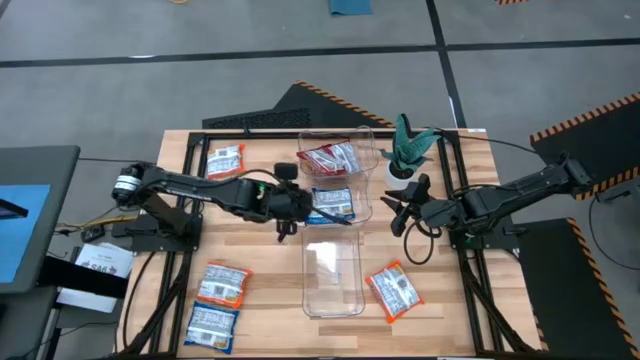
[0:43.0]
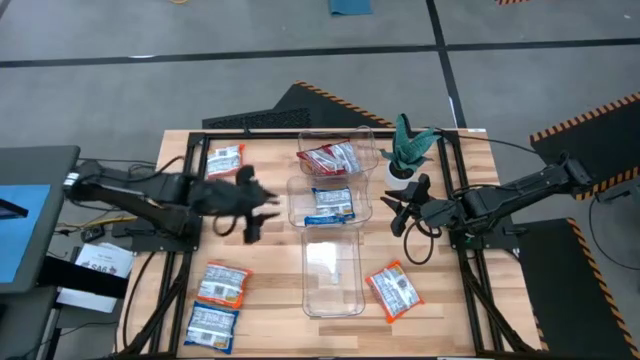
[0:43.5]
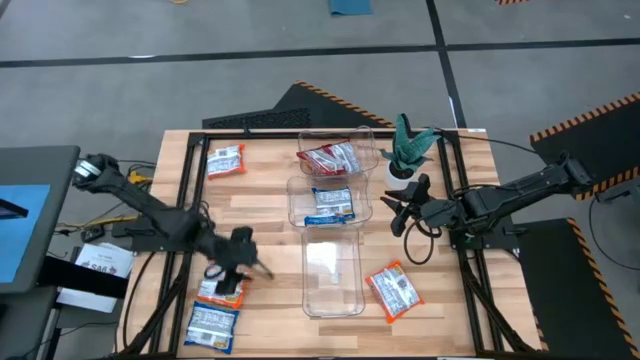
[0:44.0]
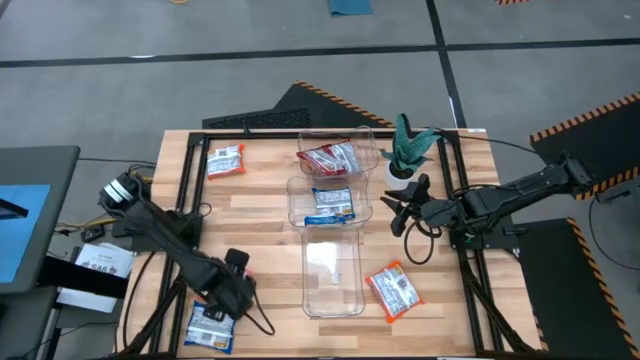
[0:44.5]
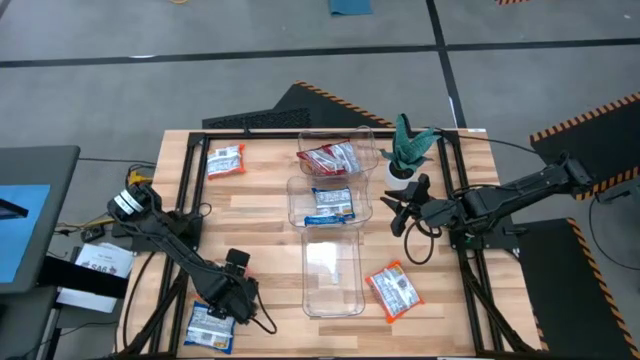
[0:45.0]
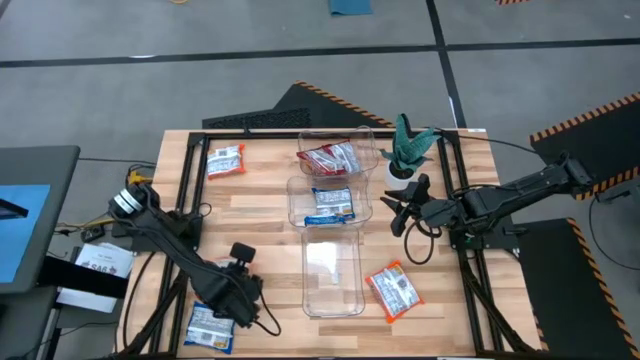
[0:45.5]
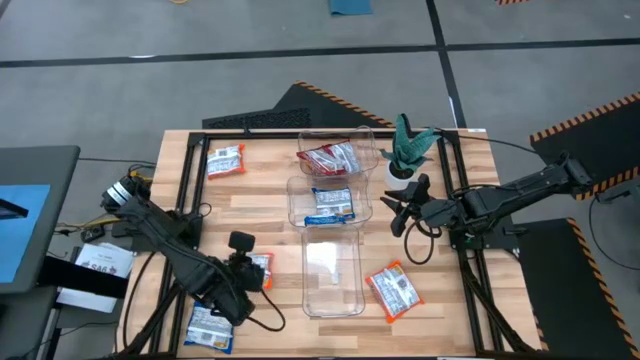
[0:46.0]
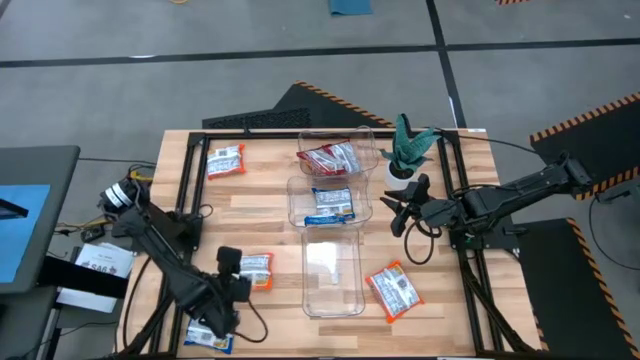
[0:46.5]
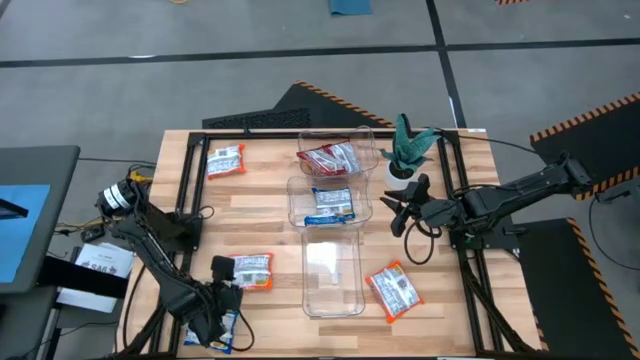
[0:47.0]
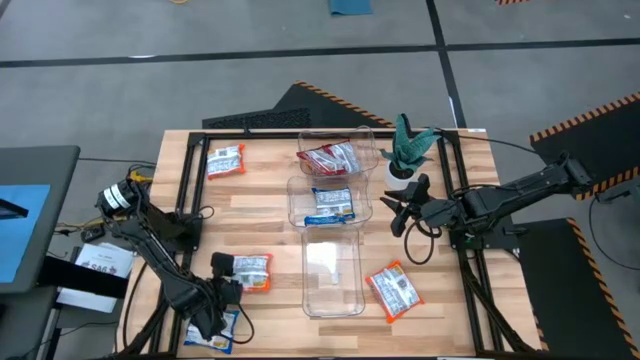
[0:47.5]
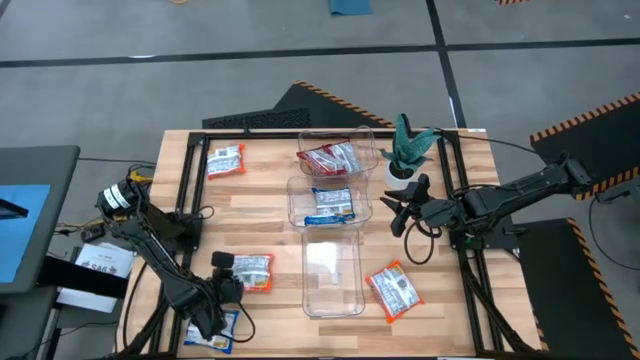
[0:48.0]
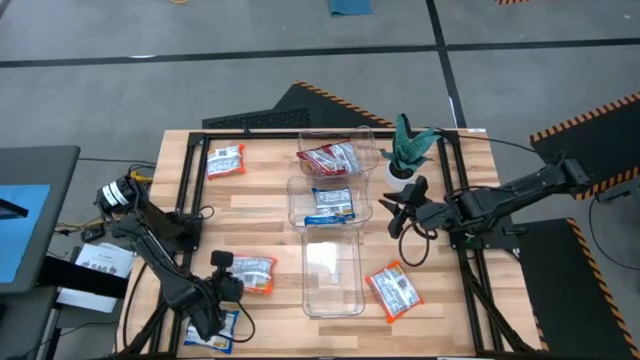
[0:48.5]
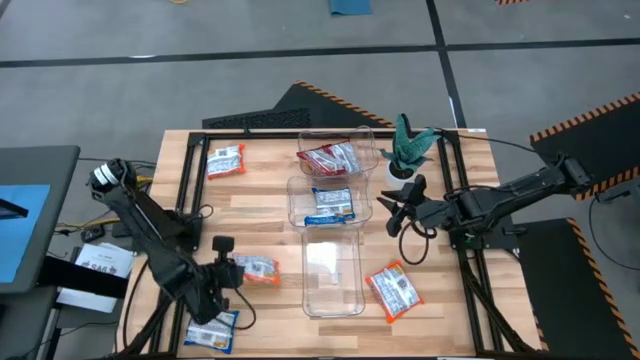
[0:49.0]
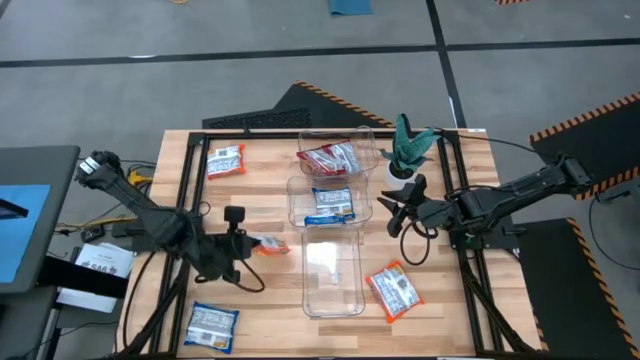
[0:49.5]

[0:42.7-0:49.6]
Task: Sort Maruchan noodles
Put the bottom left orange noodle pack into the bottom transparent bin

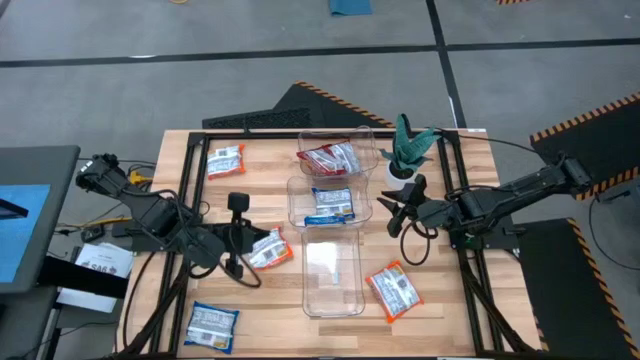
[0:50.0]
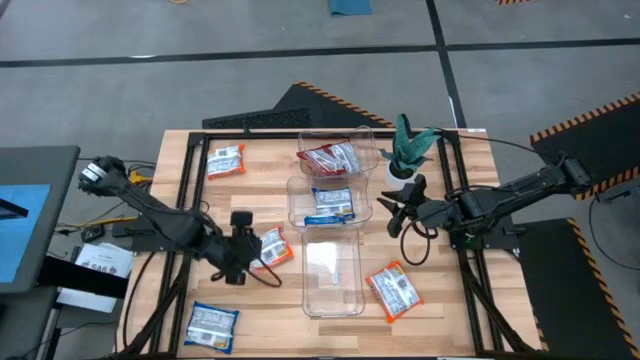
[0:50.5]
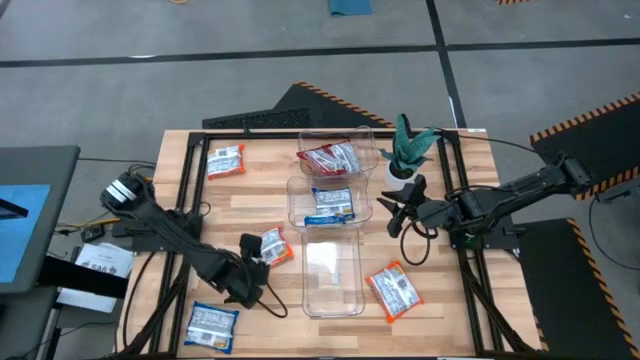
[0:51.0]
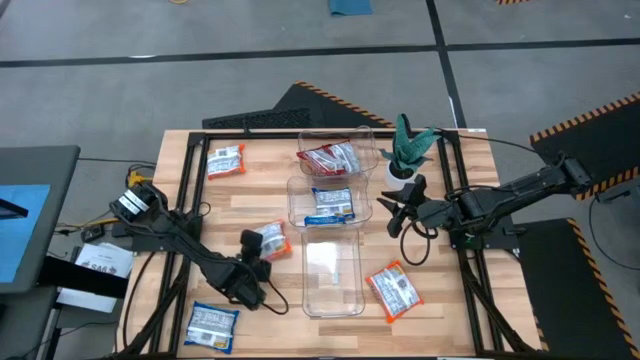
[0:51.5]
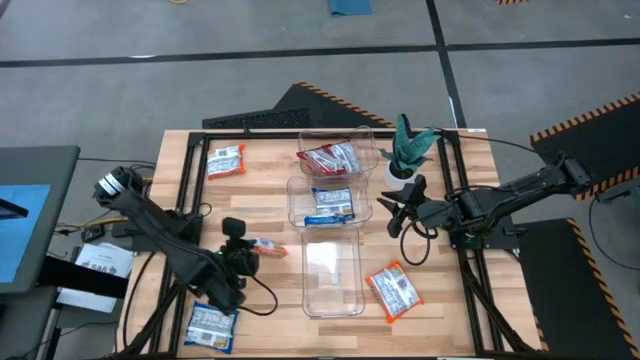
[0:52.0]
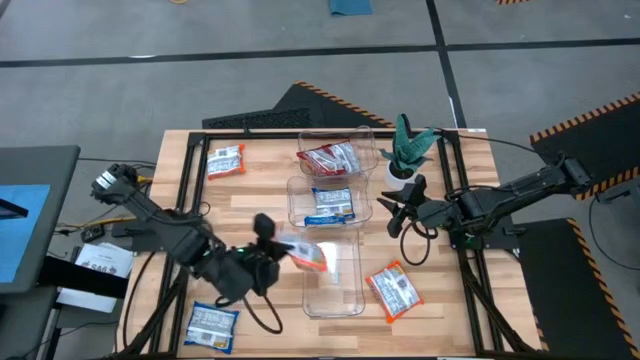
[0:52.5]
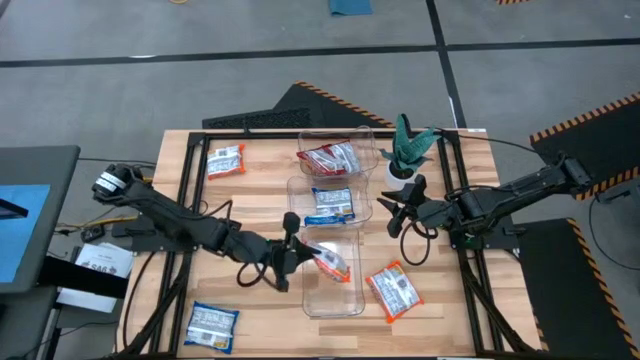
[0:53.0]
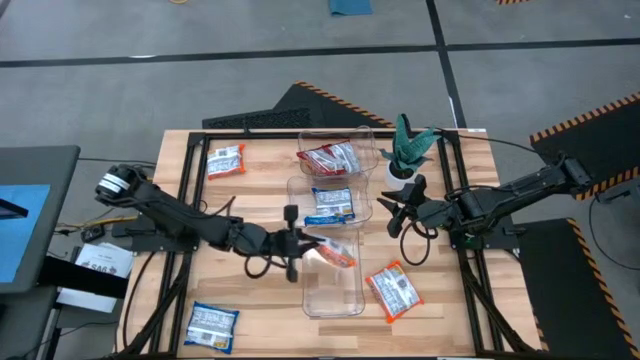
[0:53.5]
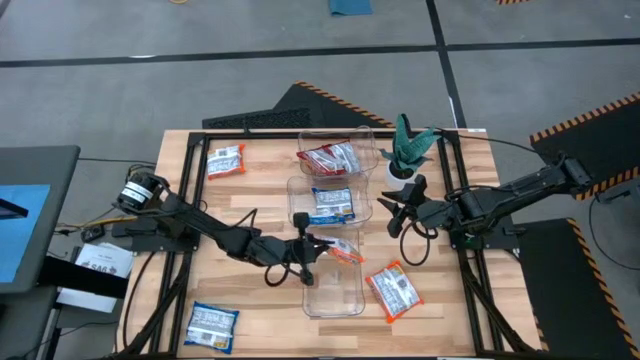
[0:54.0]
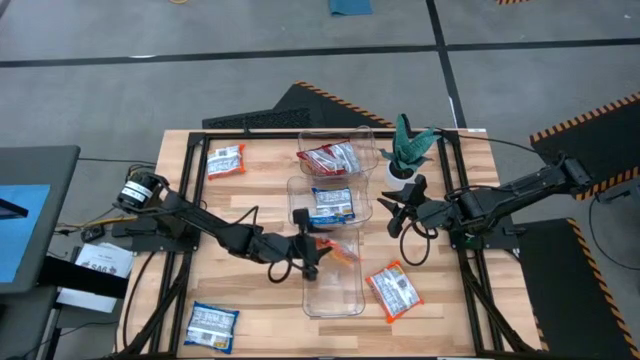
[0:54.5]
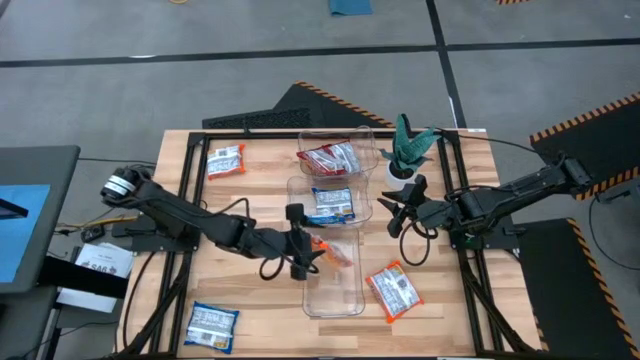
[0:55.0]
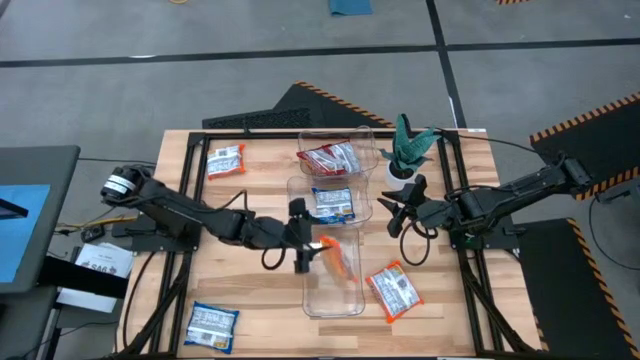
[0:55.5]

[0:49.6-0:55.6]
Put the bottom left orange noodle pack into the bottom transparent bin

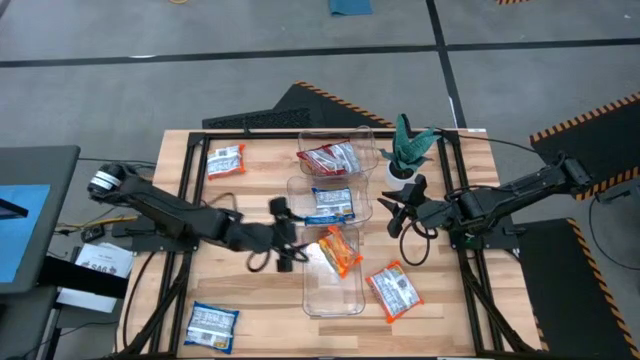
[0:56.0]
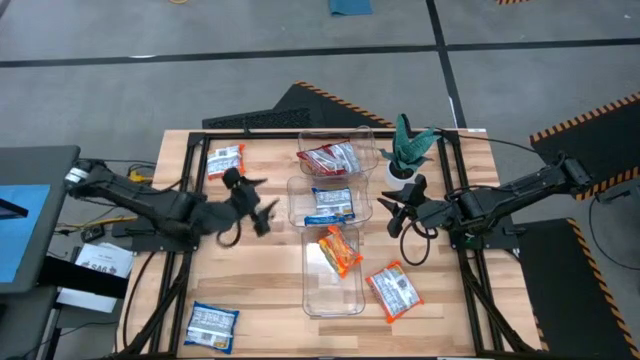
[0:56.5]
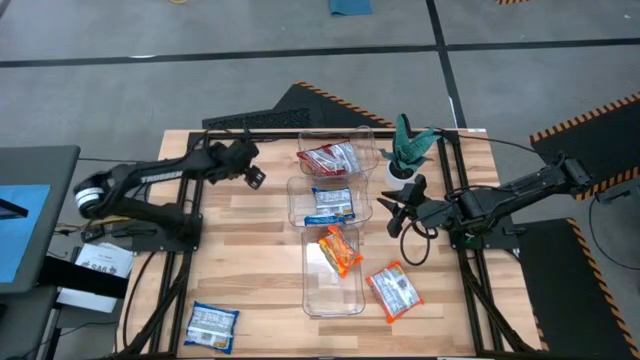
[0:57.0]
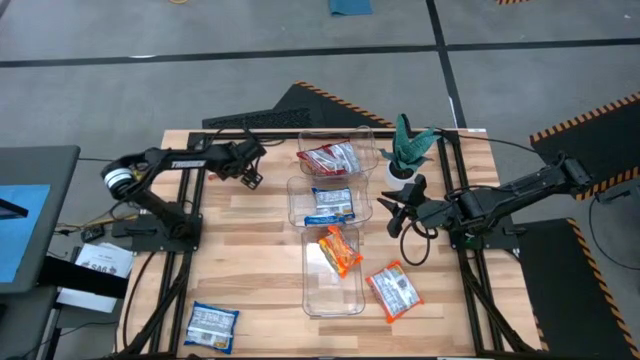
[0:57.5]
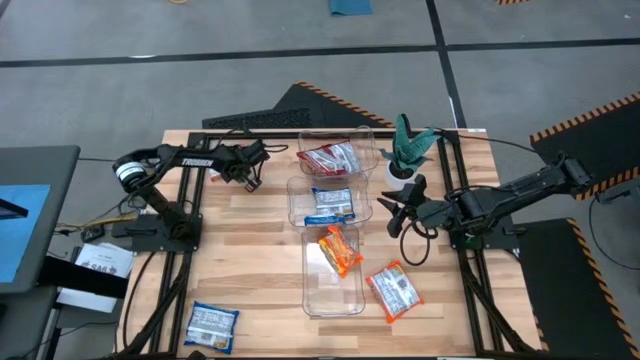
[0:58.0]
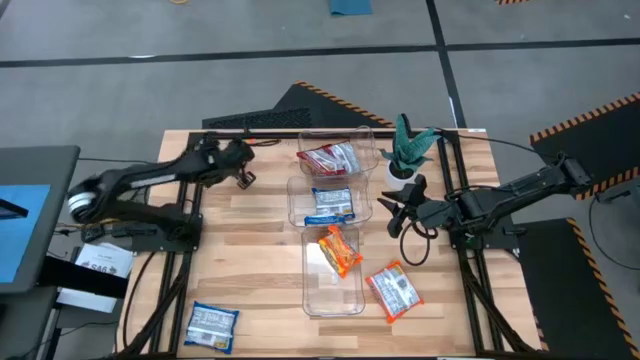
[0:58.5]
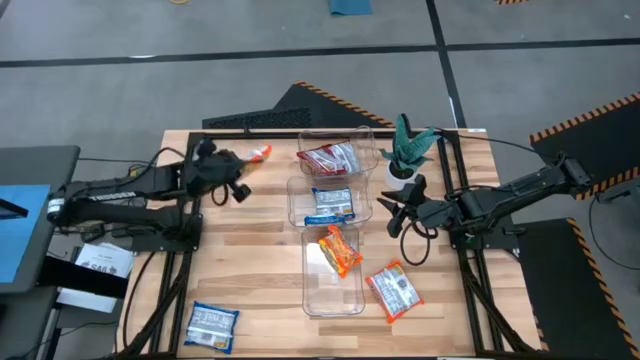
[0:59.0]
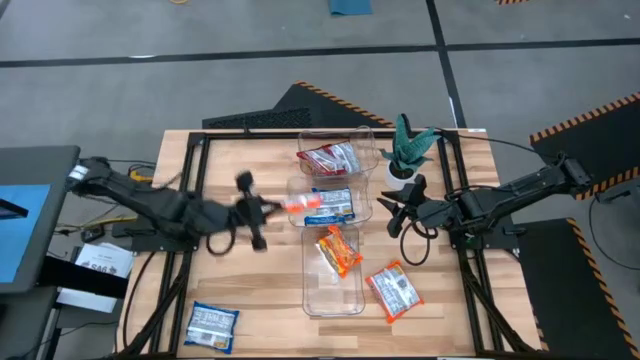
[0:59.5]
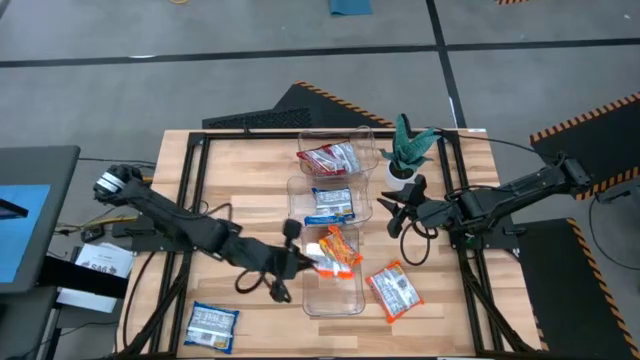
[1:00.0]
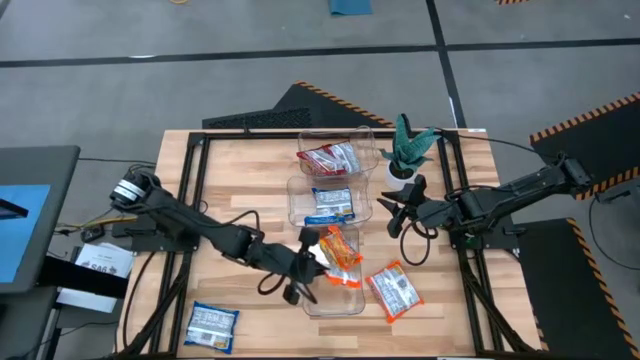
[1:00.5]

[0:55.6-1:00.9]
Put the top orange noodle pack into the bottom transparent bin

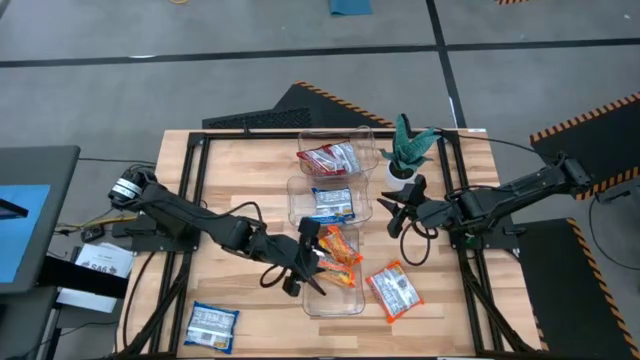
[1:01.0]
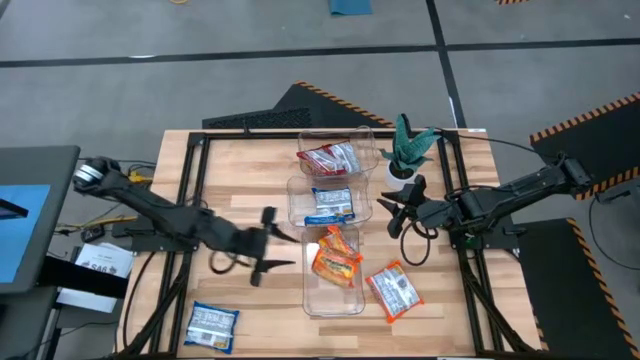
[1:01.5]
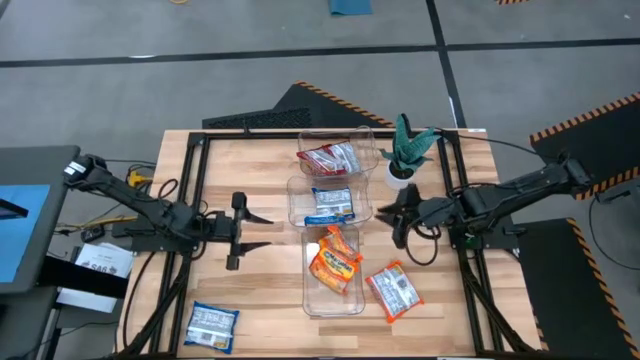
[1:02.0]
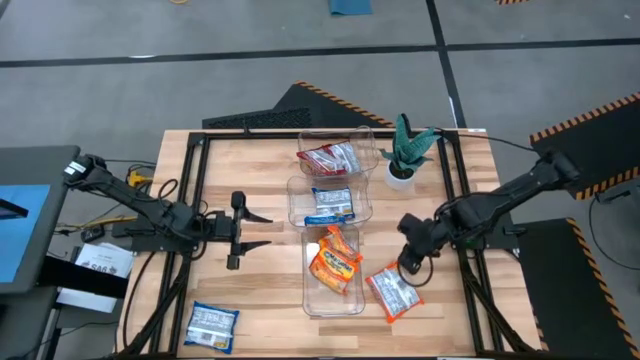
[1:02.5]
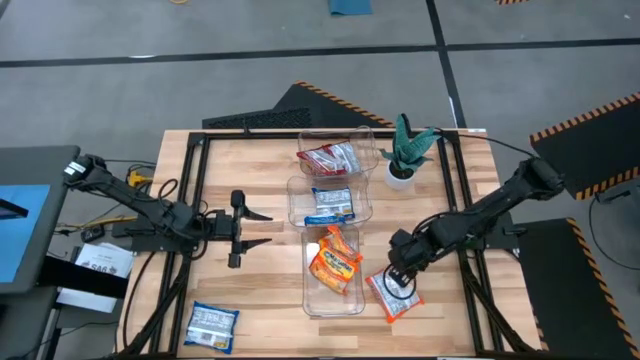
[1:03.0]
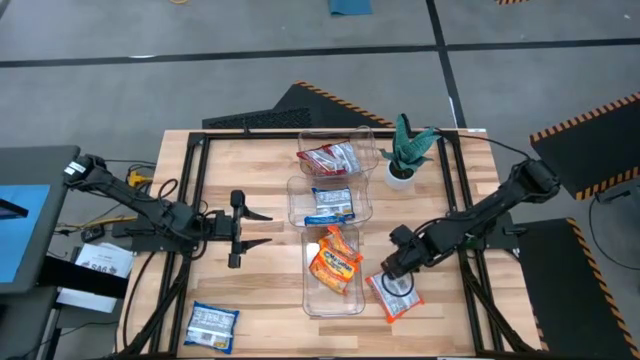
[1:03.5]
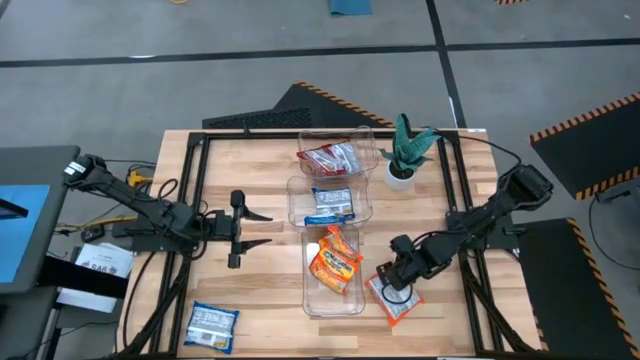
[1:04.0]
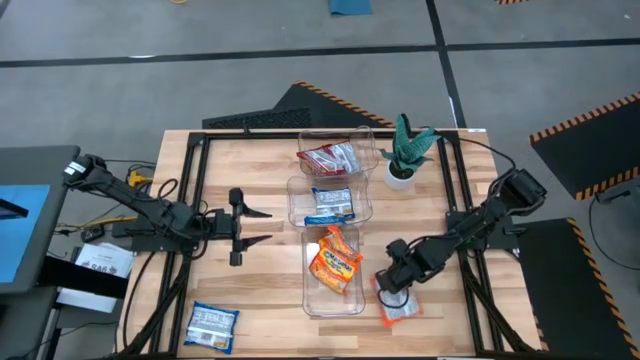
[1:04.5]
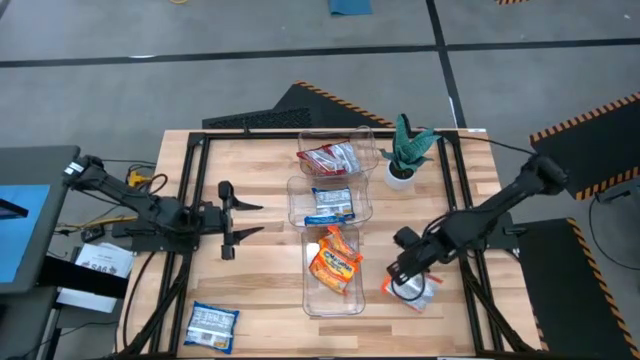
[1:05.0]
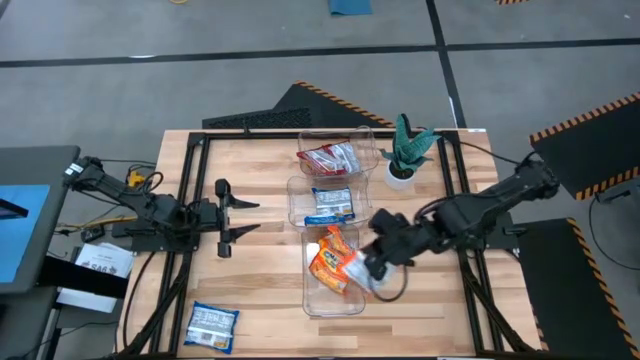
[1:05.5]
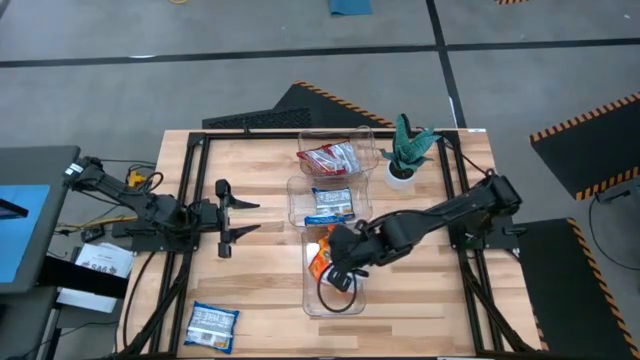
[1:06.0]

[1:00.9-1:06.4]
Put the orange noodle pack into the bottom transparent bin
